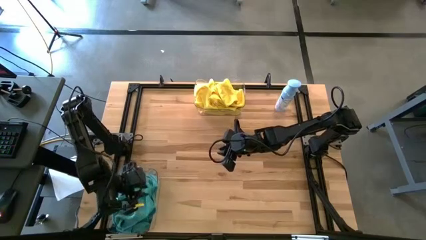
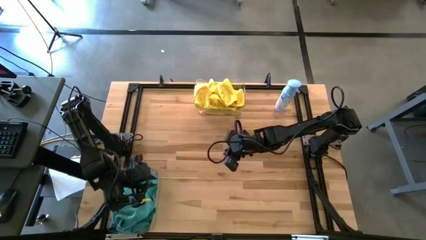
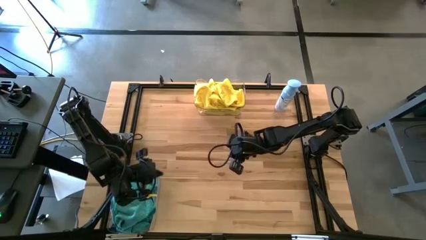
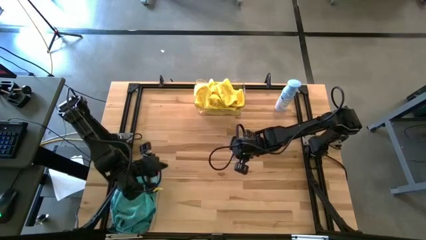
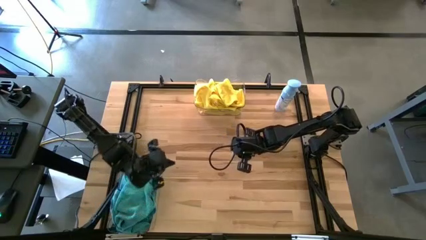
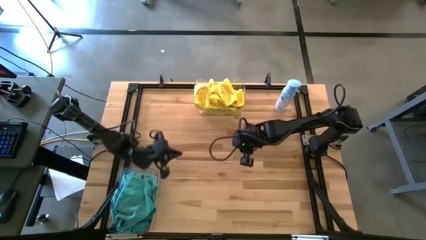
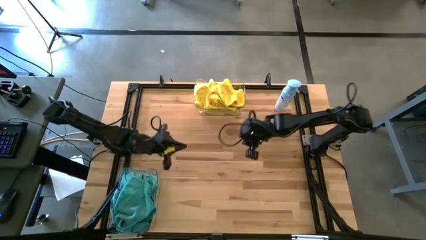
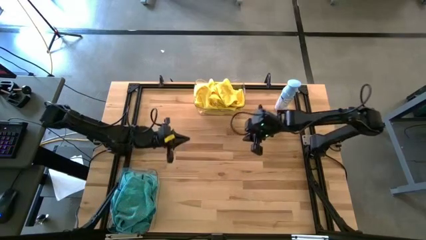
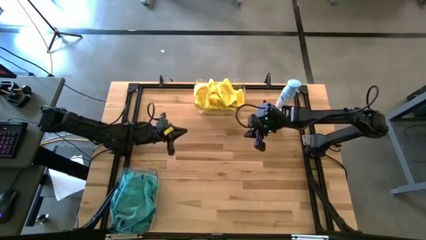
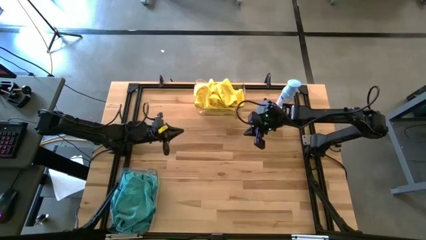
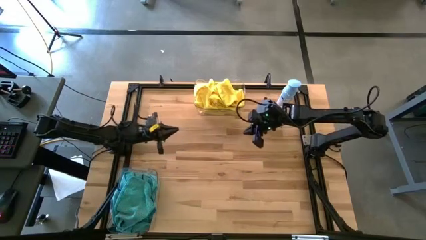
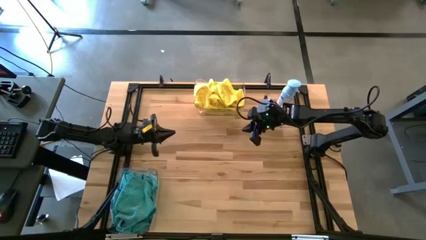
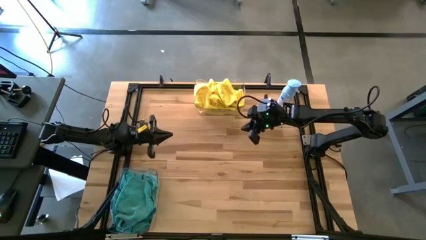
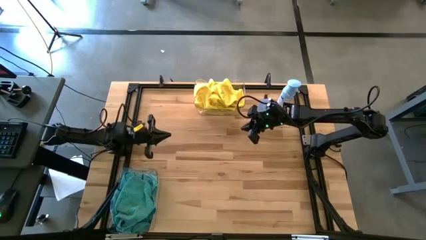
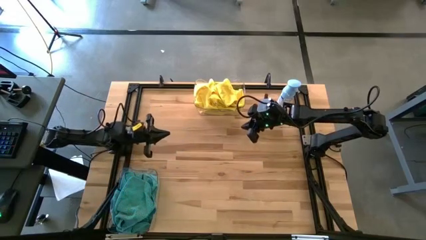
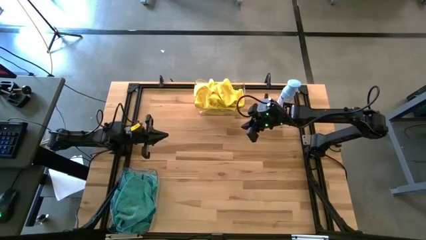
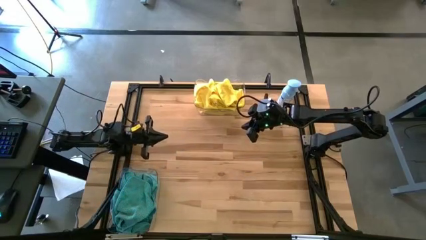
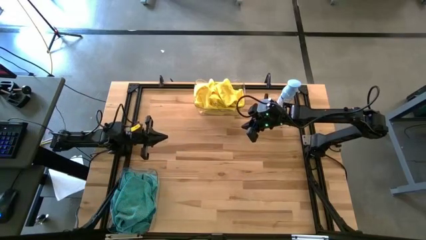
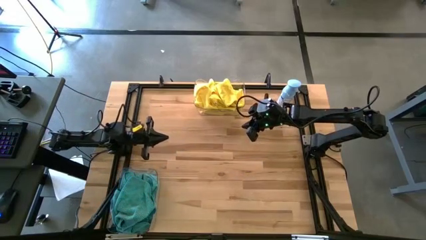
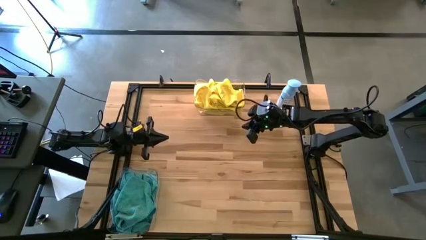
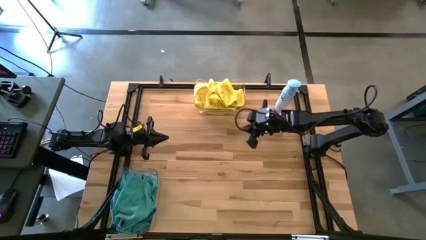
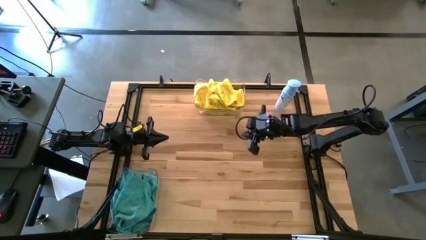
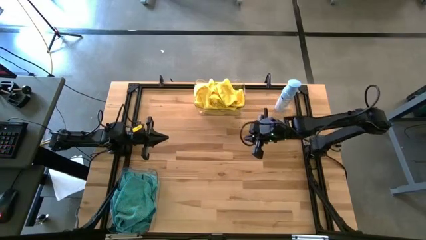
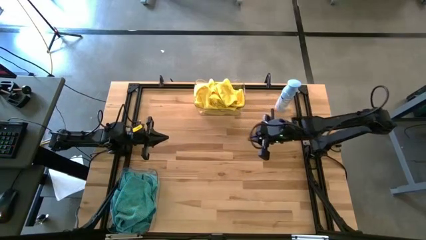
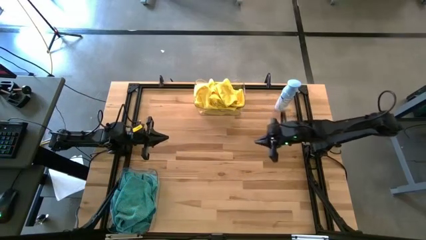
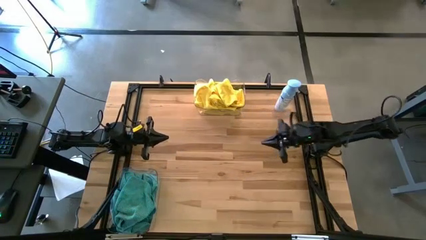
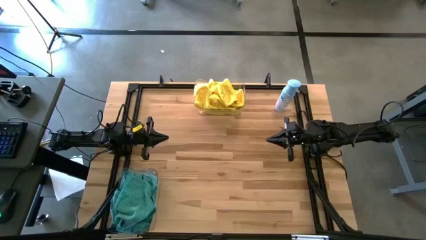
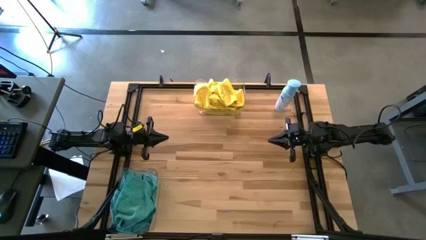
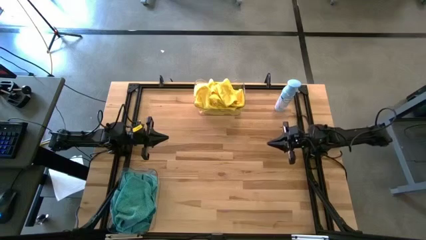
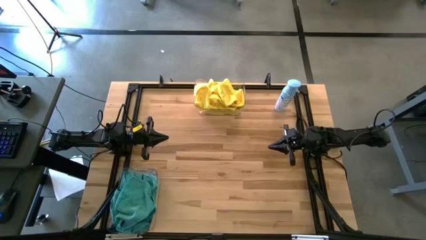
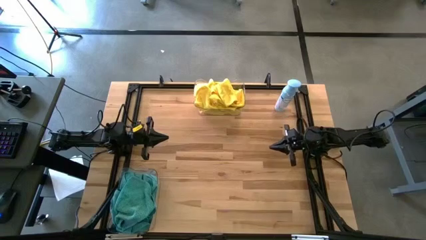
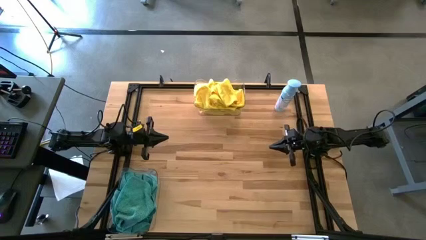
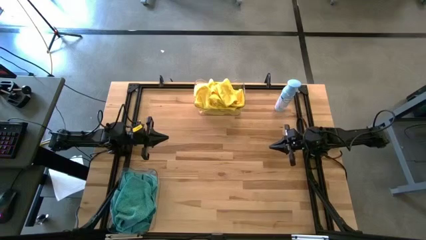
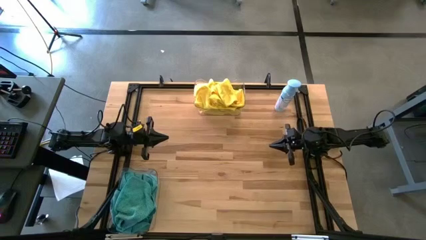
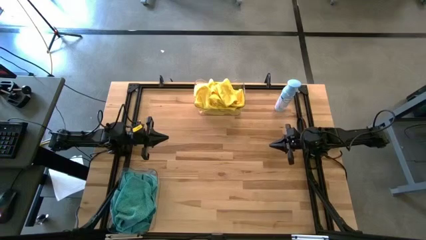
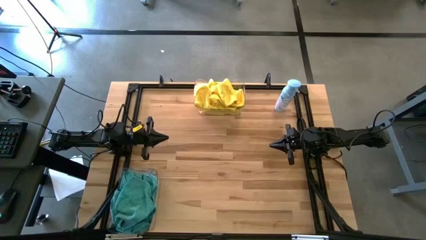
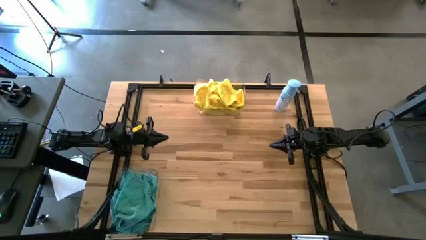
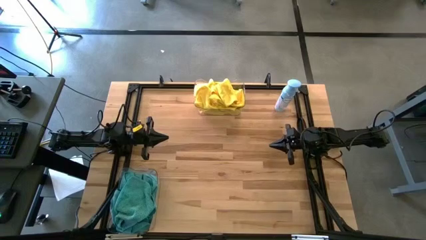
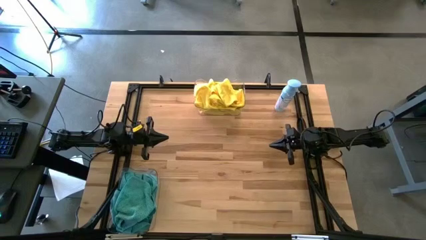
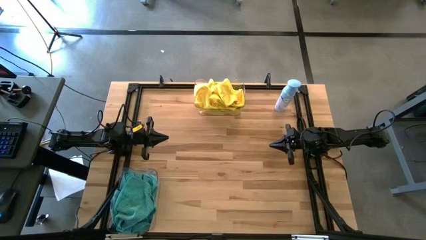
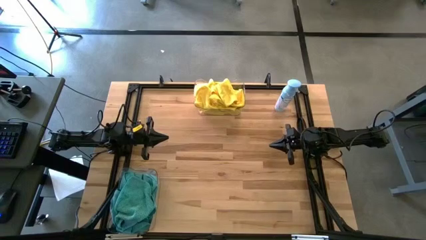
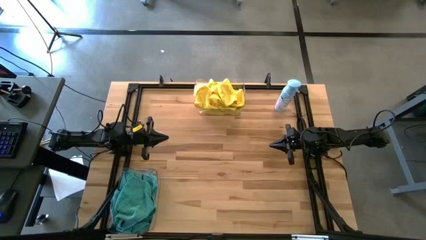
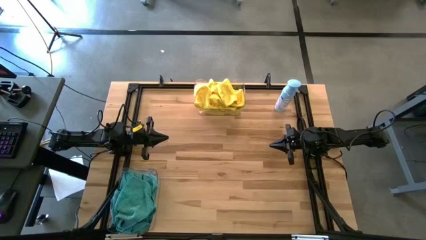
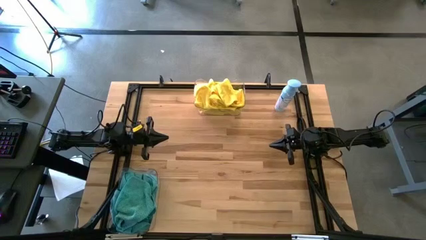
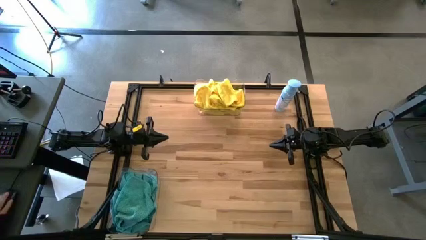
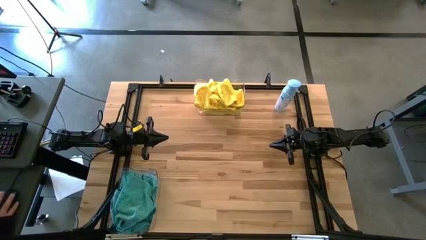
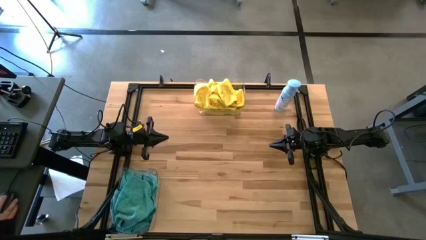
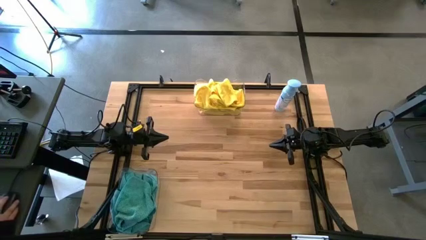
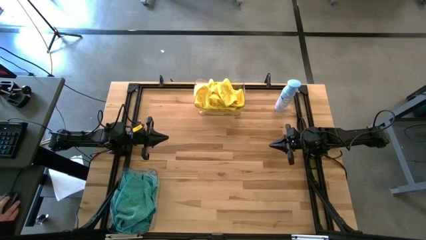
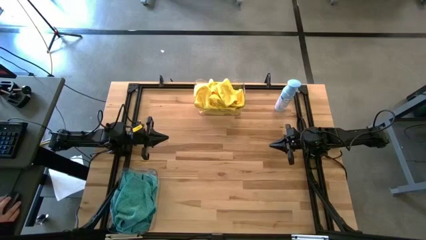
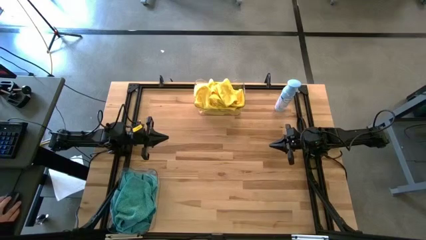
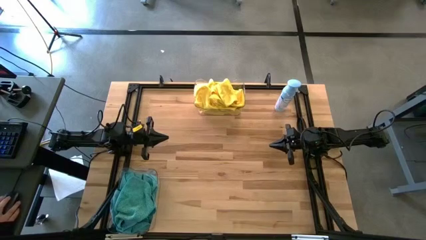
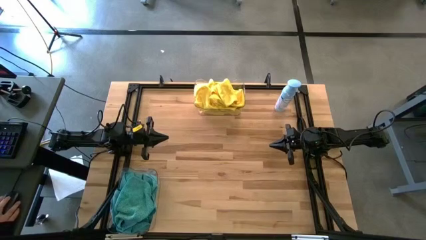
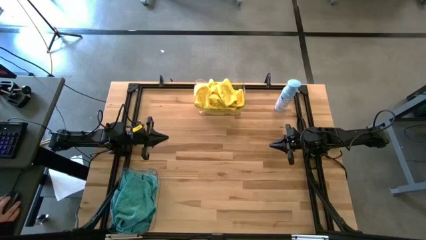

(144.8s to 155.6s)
Task: Sort microfiber towel by color & place in baskets
Return to Home Position

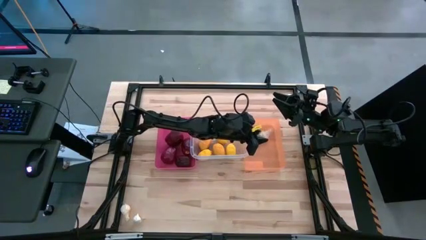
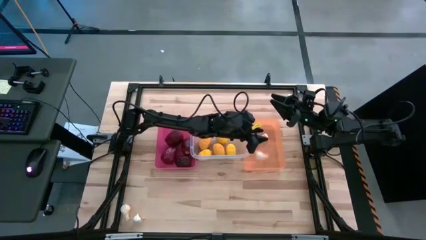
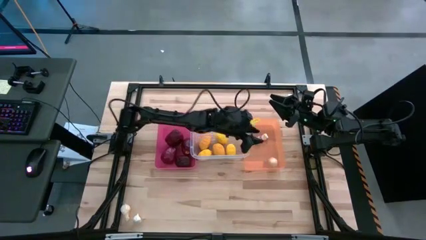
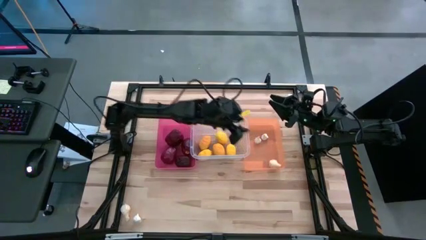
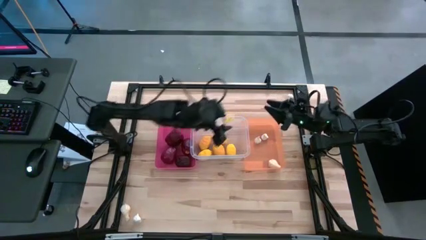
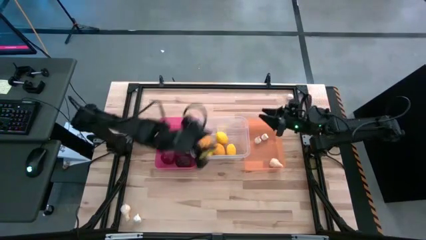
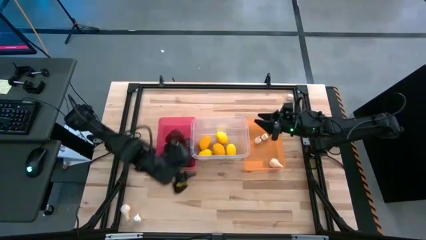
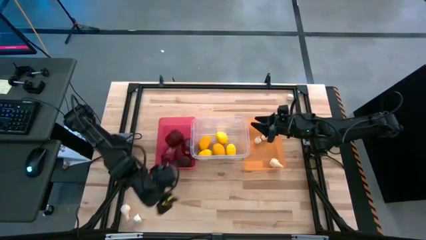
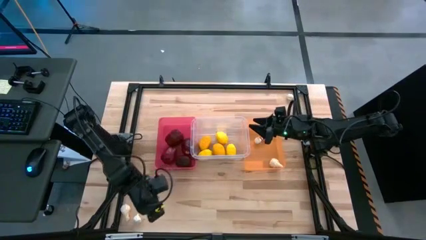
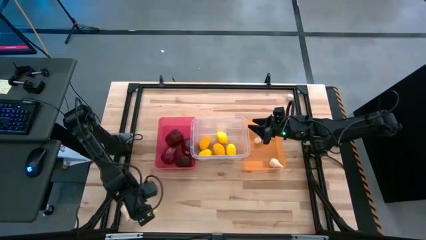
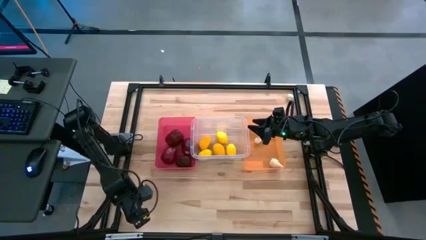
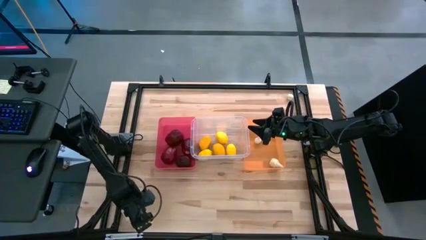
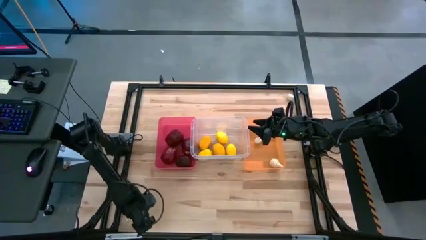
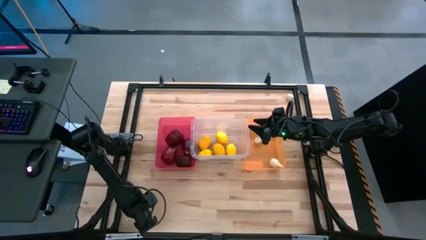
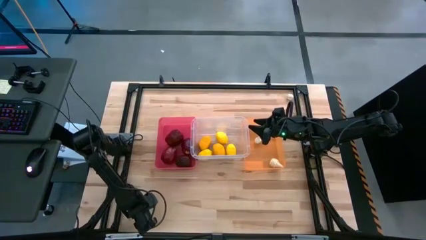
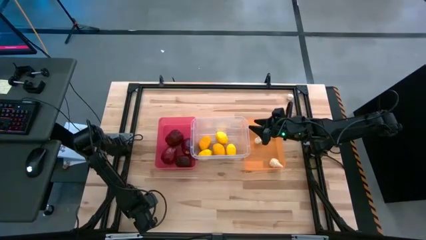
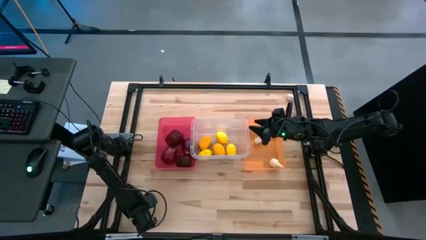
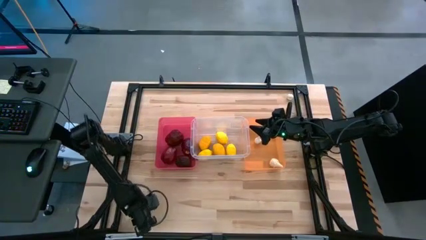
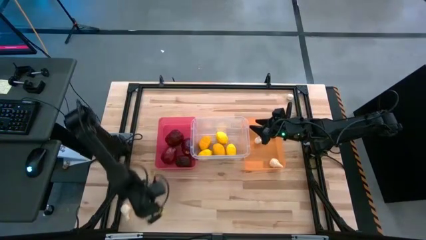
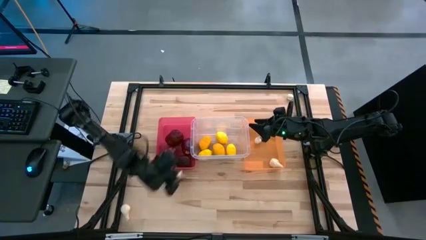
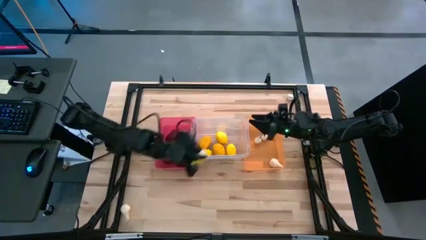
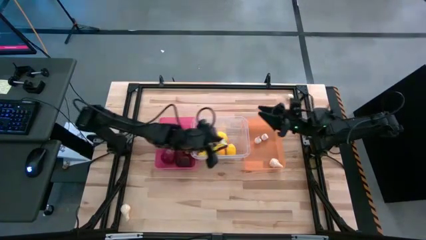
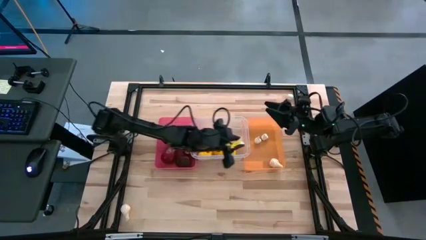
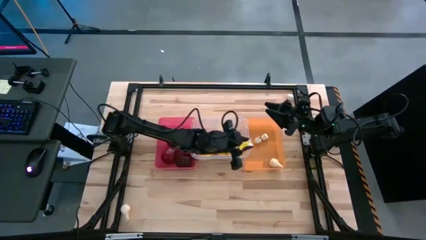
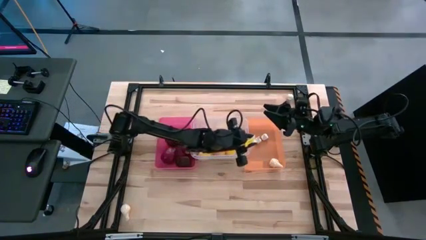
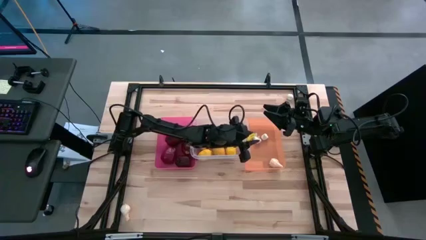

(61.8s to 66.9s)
Task: Sort produce into baskets
Put the white garlic into the orange bin

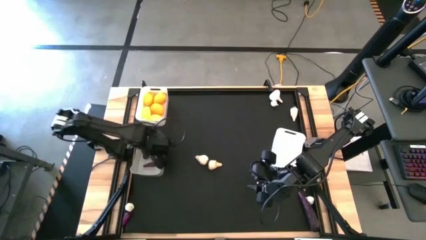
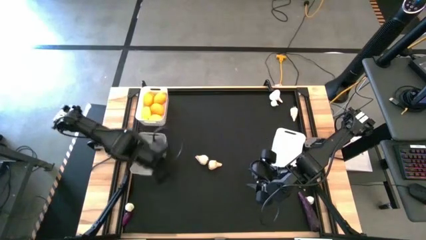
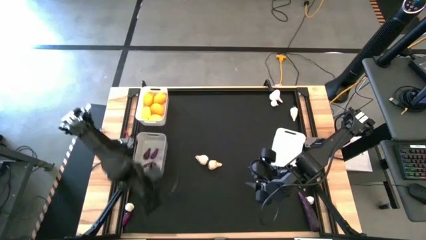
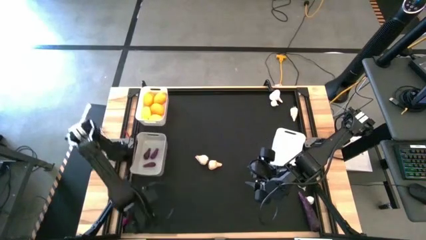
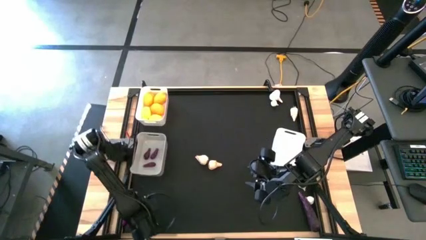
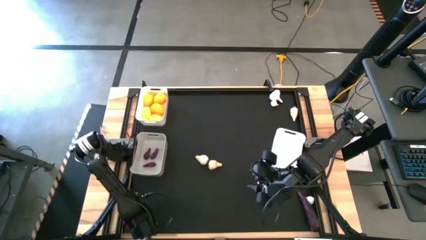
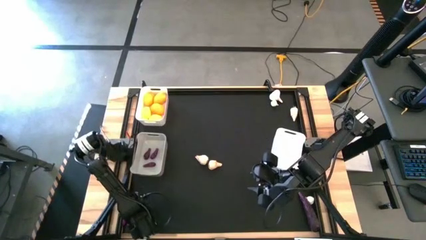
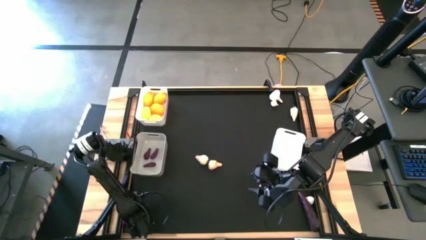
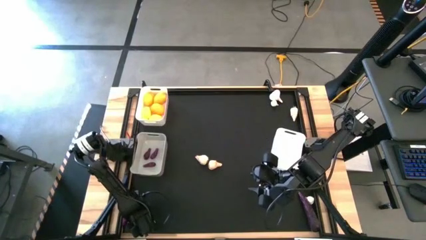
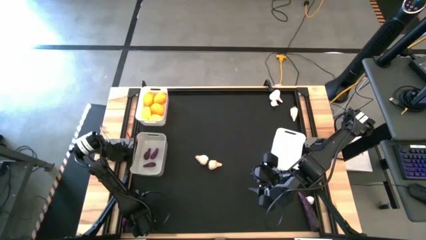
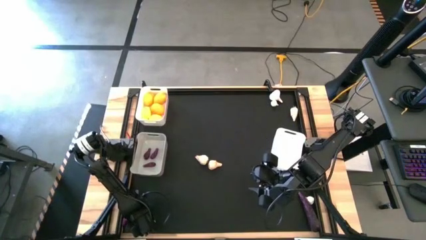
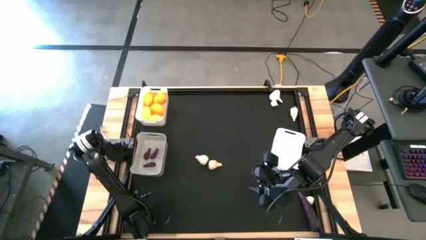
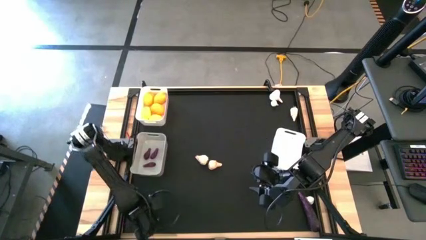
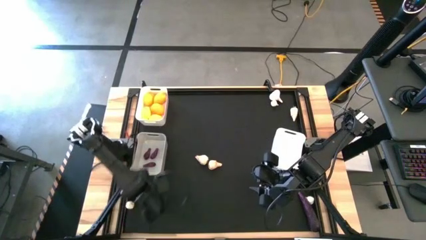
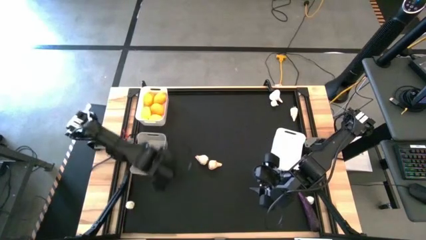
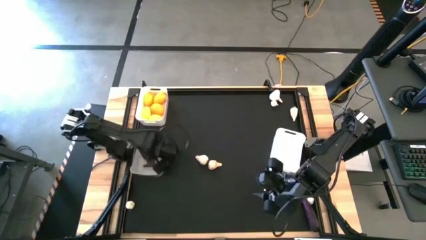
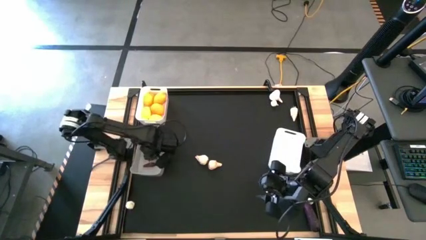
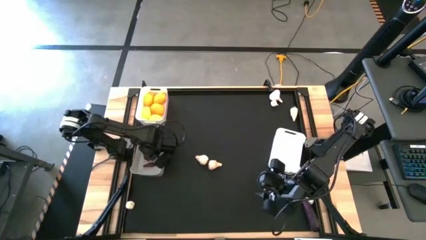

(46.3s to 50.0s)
Task: Sort produce into baskets
Put the violet eggplant into the gray bin
